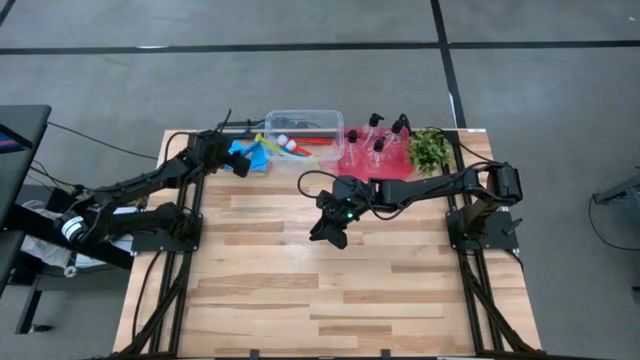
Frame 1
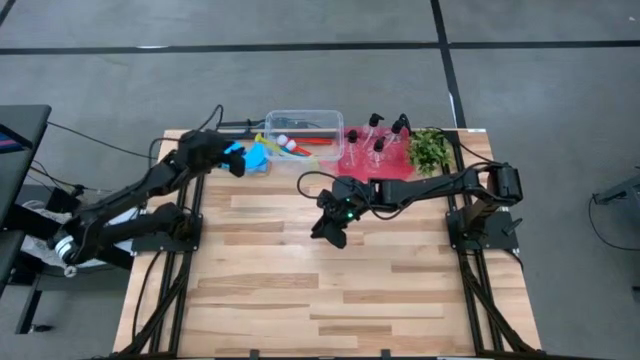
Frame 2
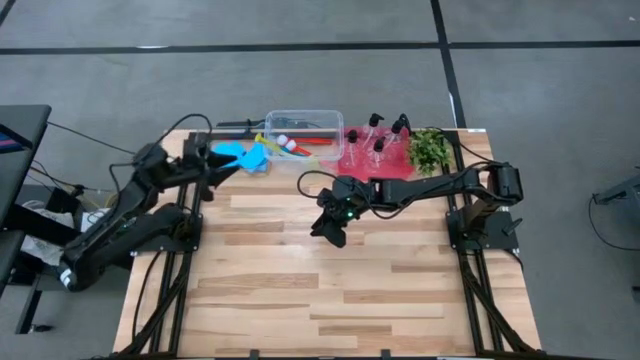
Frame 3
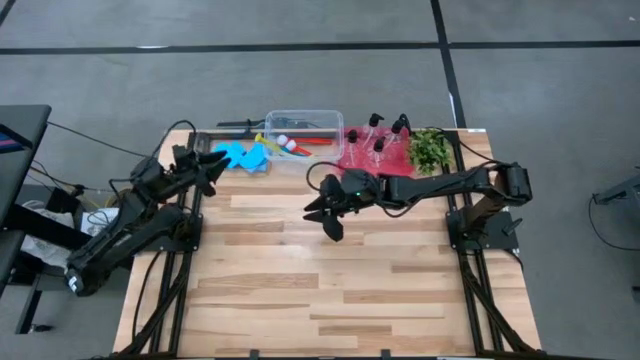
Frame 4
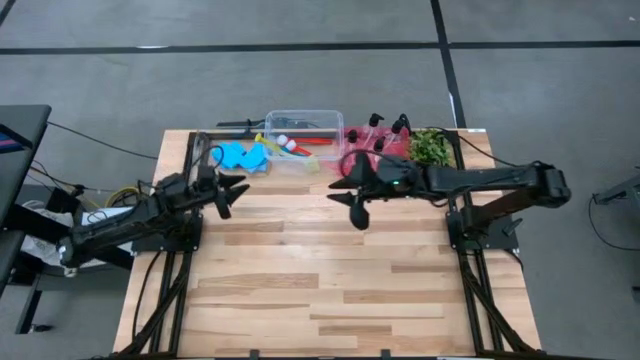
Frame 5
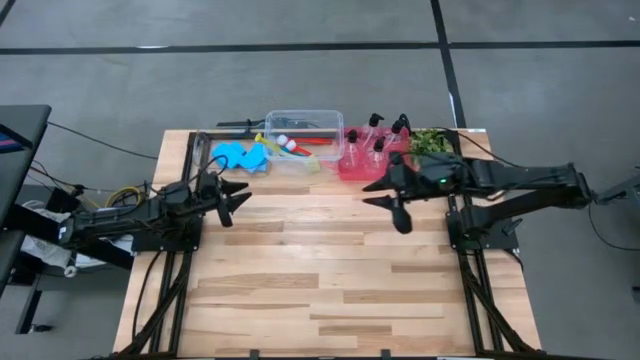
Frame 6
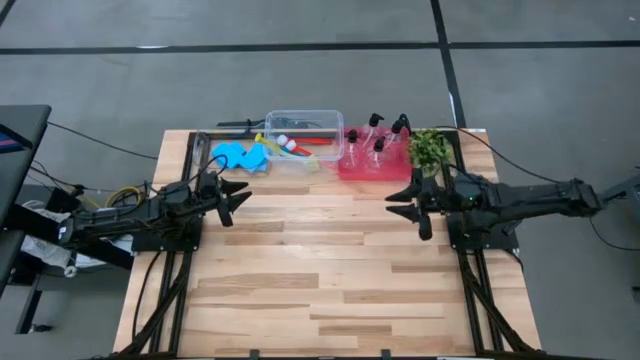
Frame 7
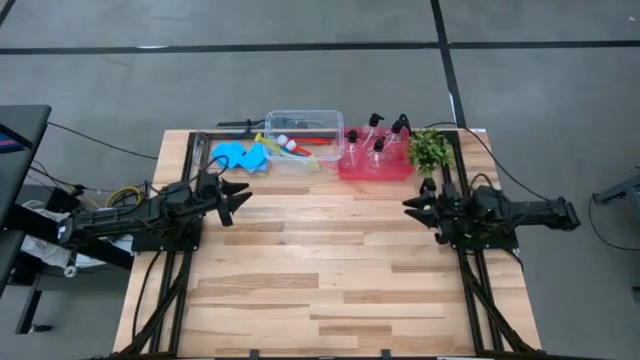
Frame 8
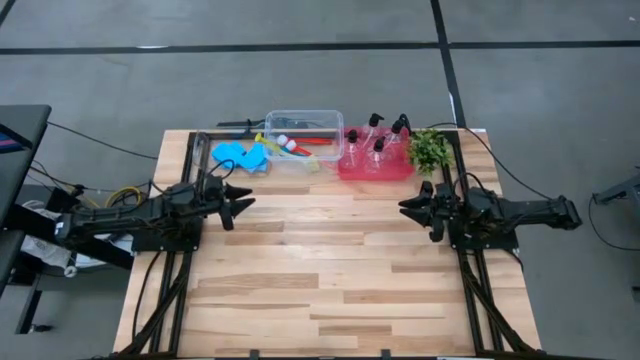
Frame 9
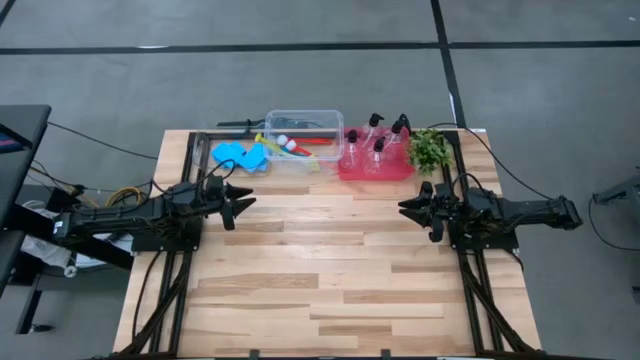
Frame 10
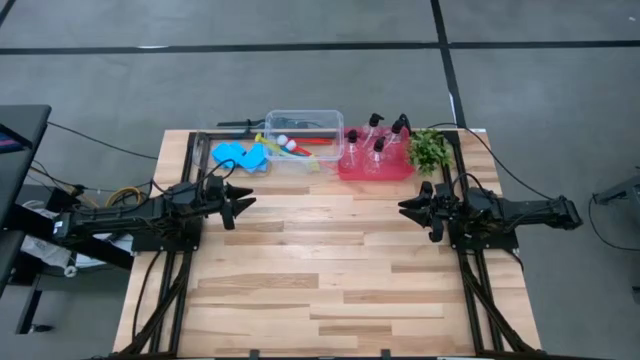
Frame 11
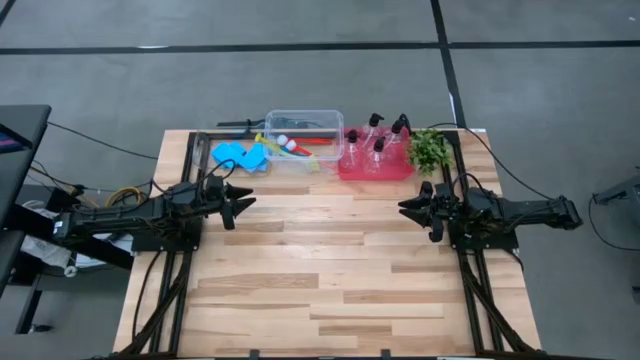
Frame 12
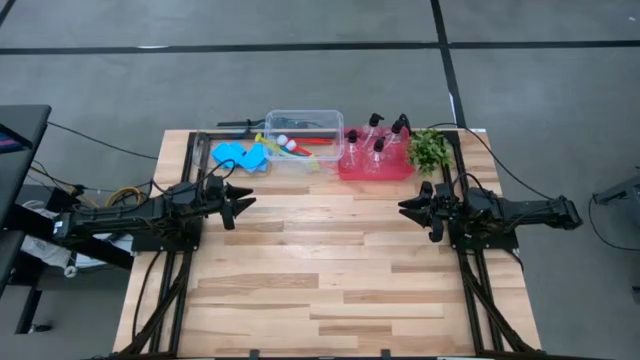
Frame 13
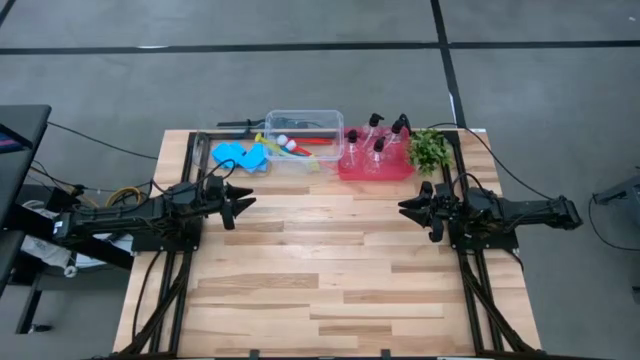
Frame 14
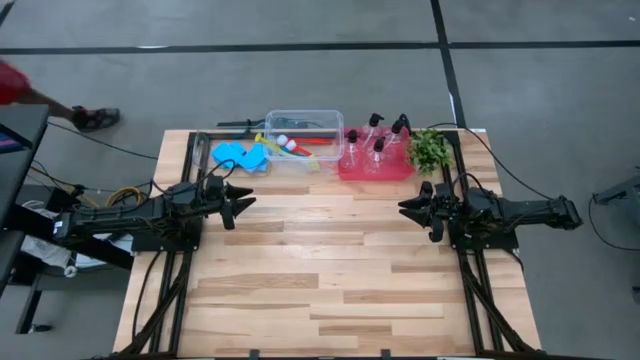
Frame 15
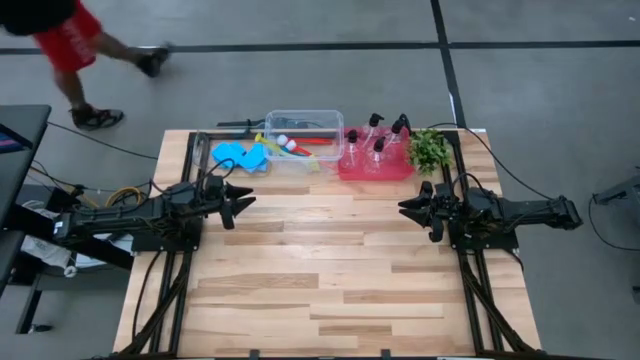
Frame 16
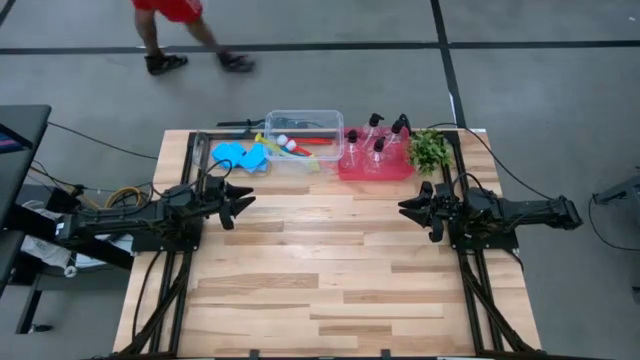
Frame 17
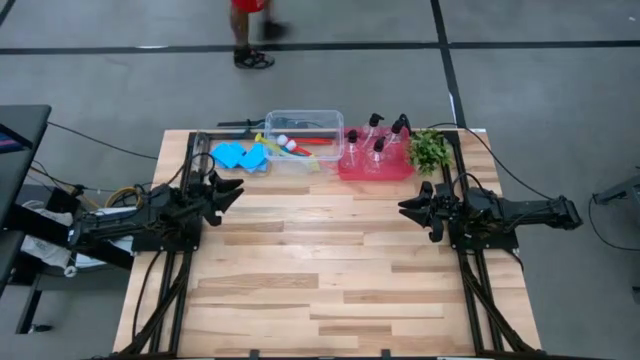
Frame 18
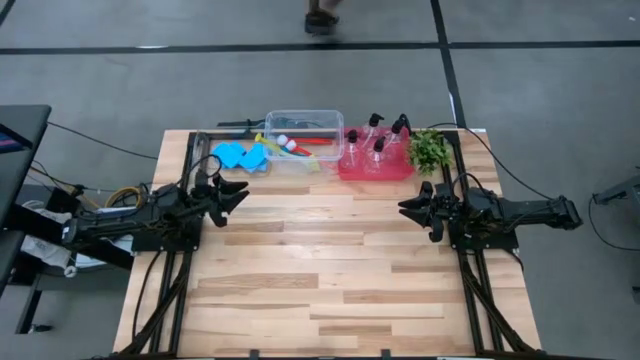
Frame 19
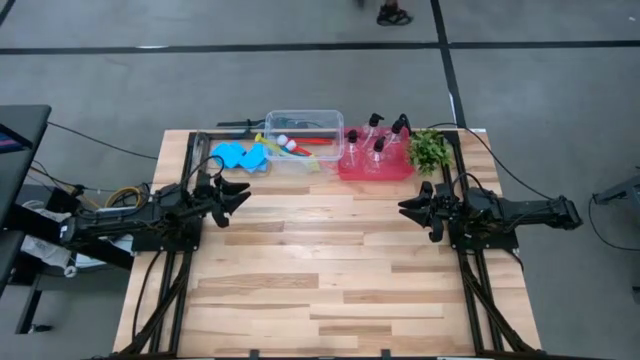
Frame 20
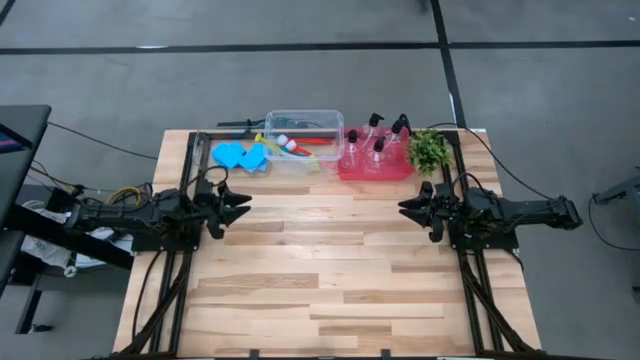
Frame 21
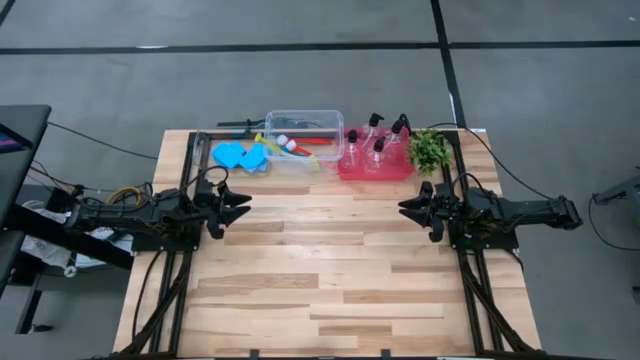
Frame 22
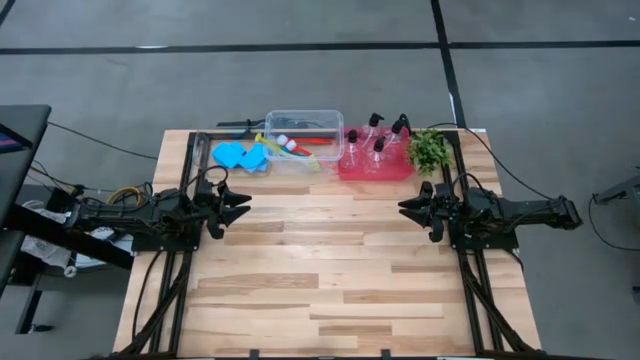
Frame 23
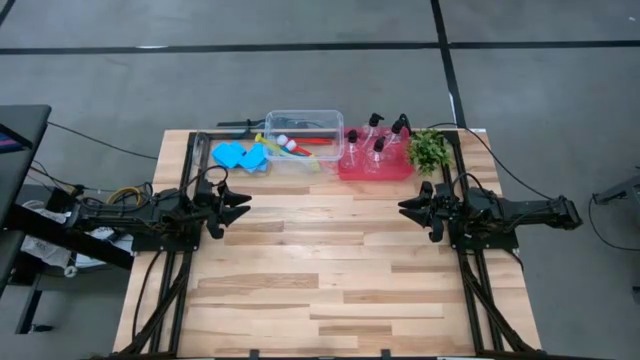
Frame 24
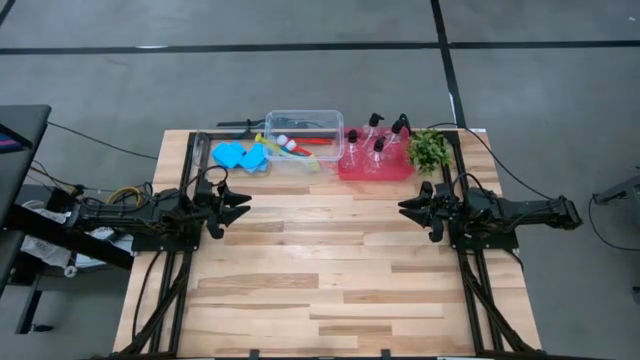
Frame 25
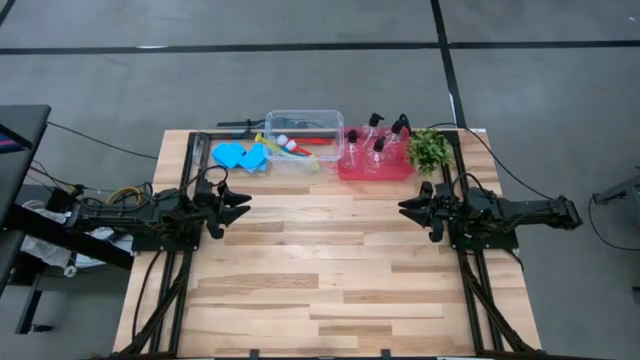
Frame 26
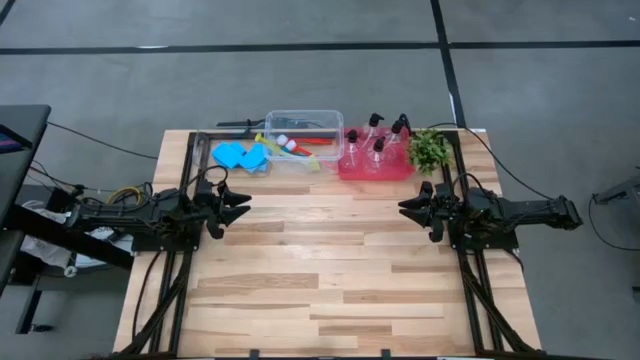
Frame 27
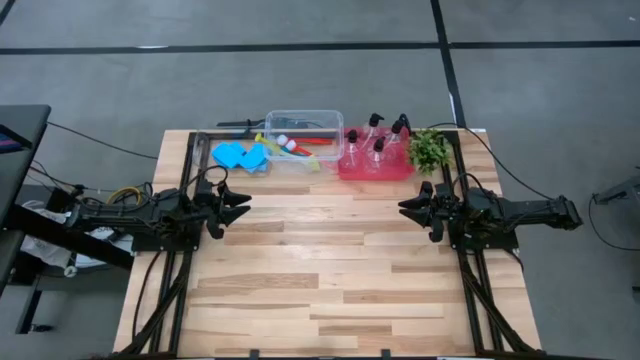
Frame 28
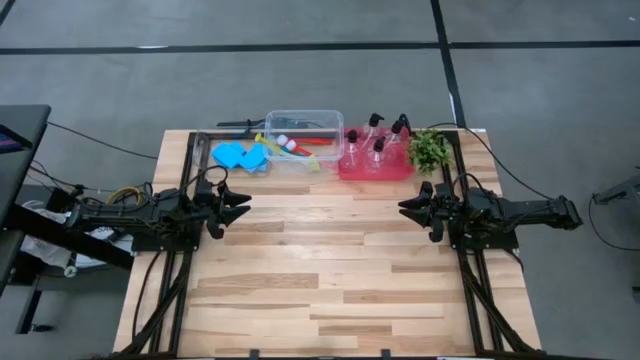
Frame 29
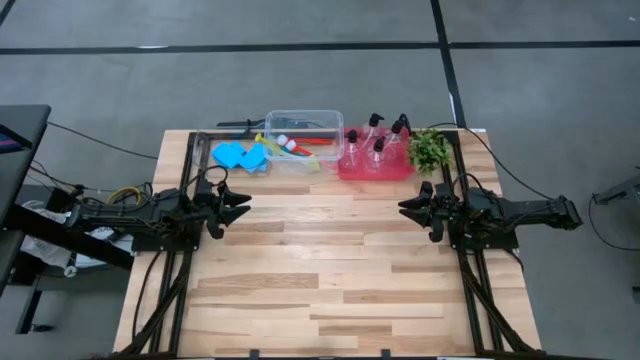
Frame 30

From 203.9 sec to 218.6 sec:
Task: Pick & Place Kitchen Sink Supplies
Return to Home Position

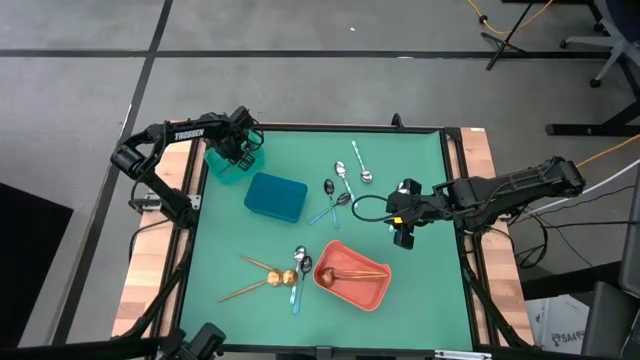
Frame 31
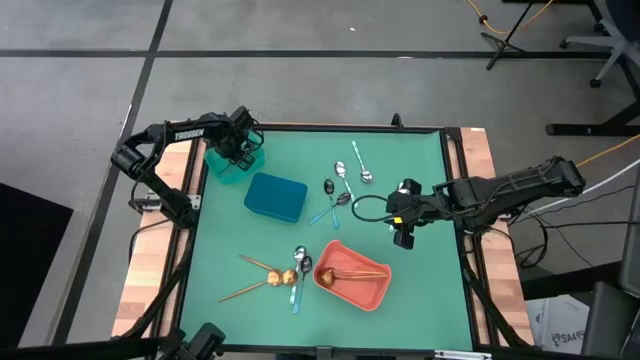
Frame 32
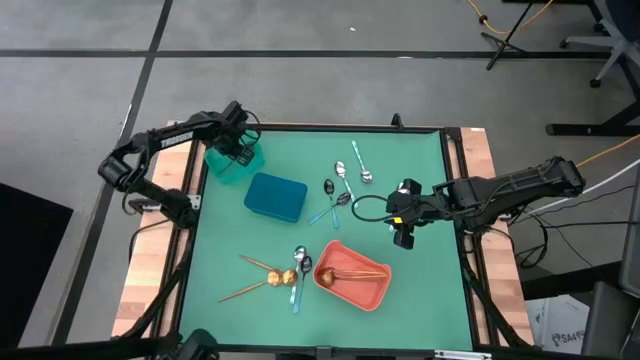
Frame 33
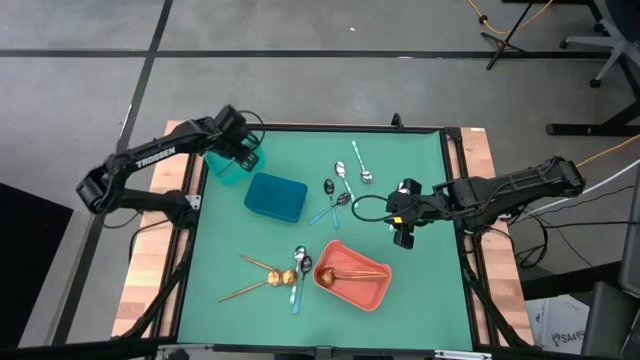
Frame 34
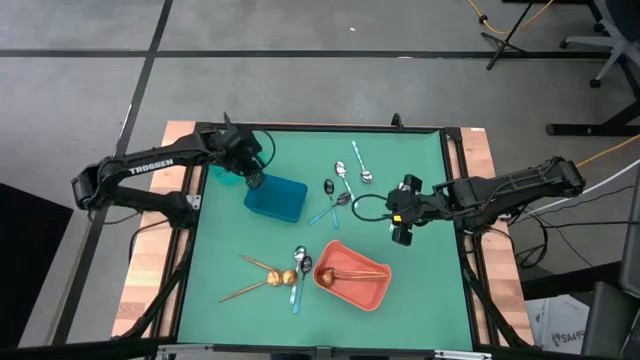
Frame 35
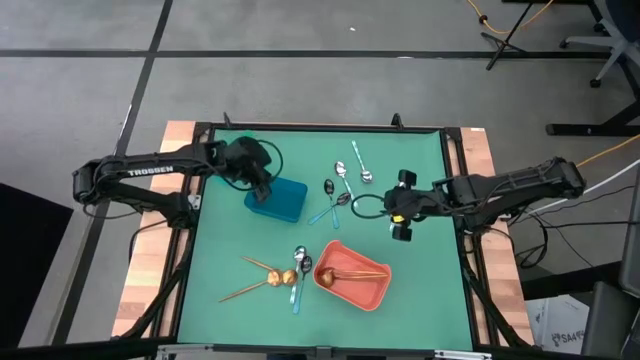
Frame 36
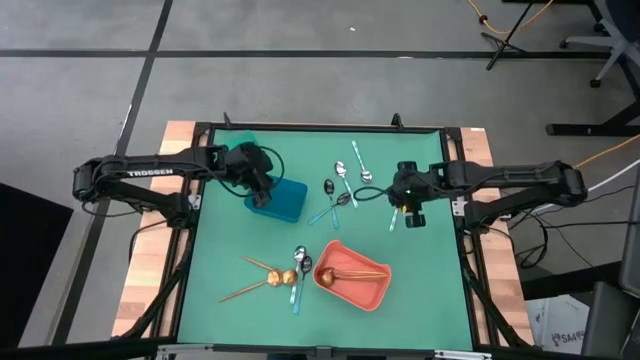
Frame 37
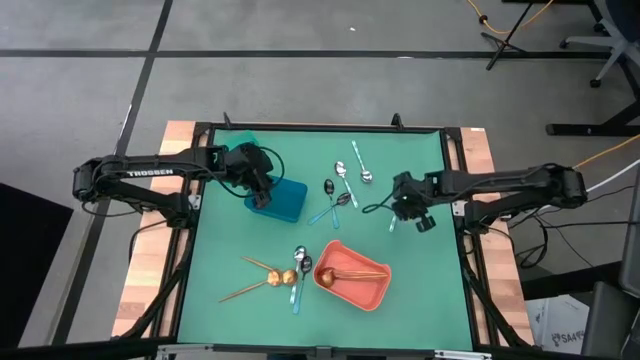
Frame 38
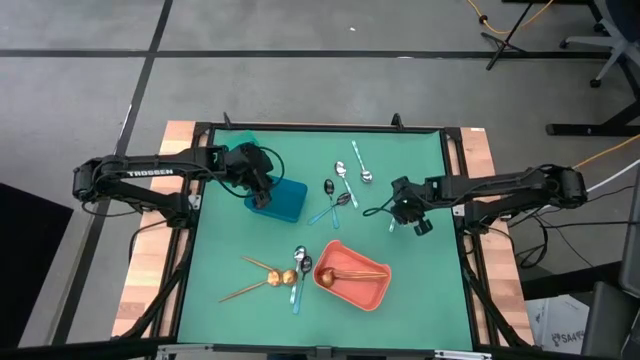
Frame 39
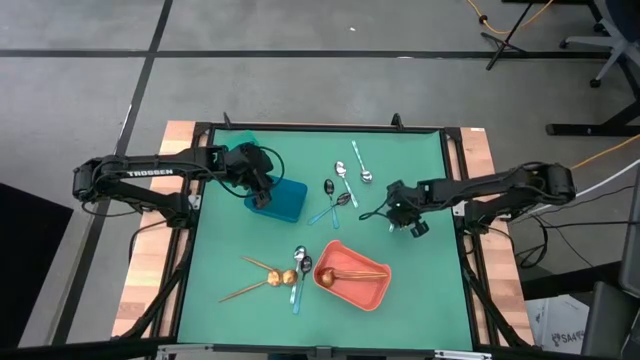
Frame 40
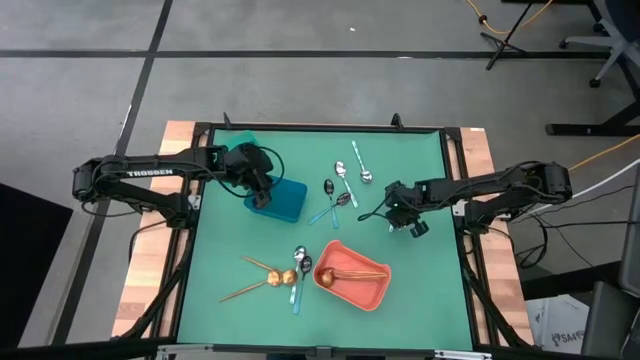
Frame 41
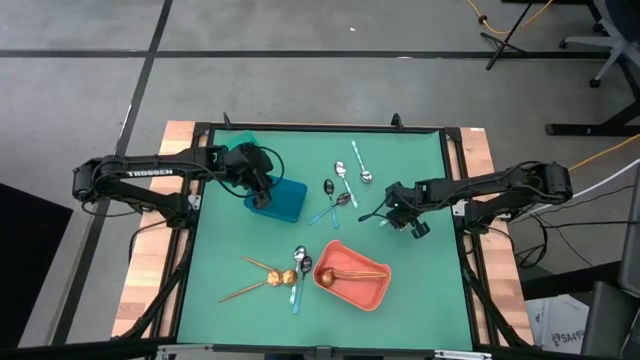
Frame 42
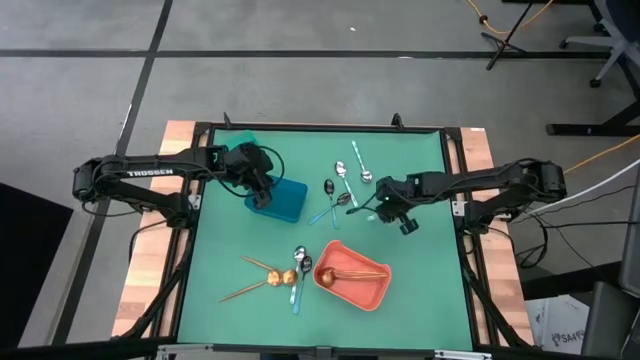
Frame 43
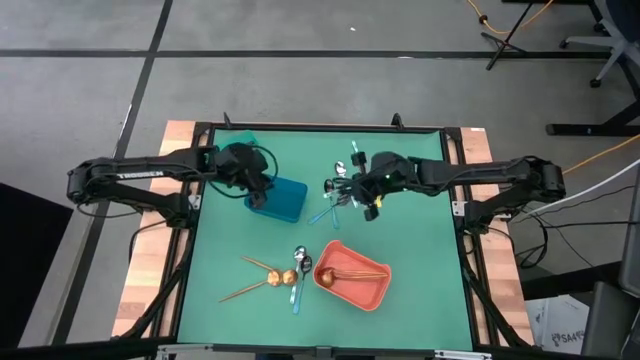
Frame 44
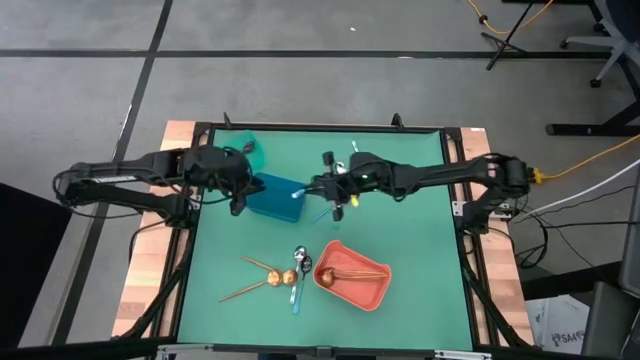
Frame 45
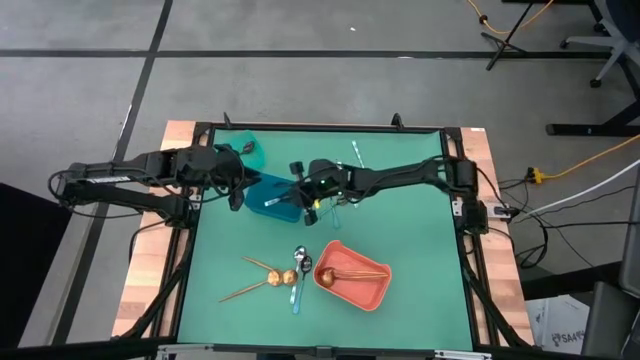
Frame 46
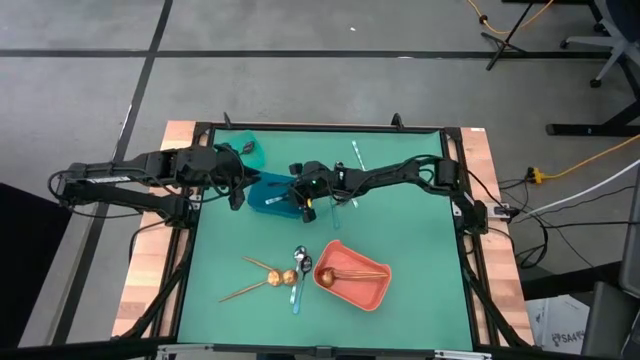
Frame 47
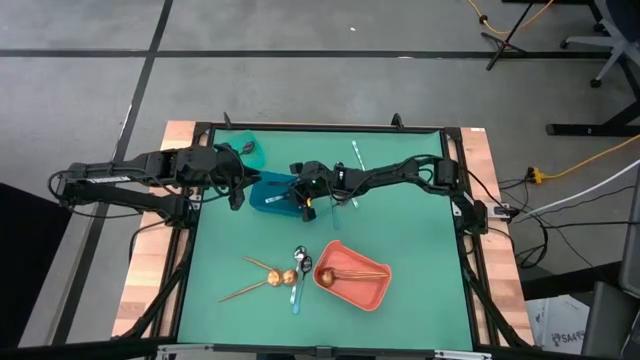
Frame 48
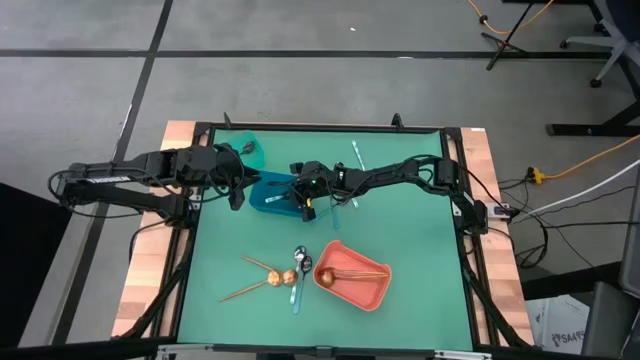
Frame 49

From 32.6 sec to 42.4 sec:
Task: Sort silverware by color (type)
Put the patterned blue spoon into the blue bin
